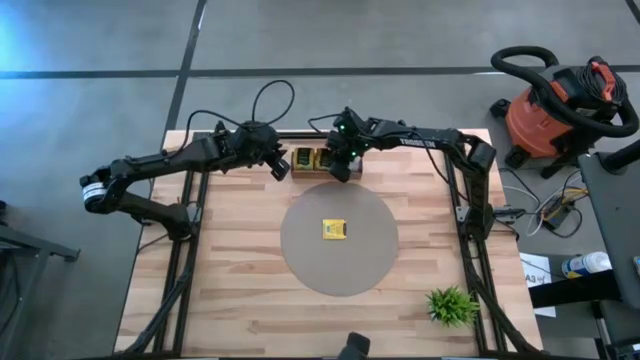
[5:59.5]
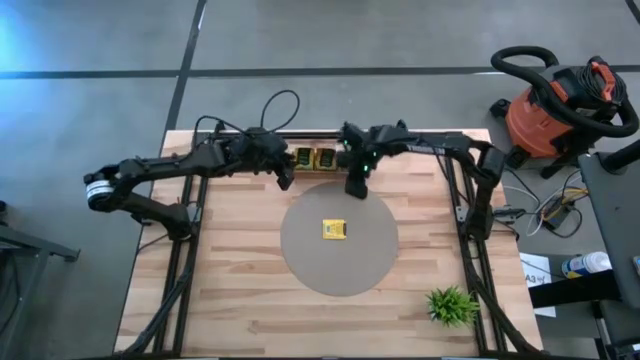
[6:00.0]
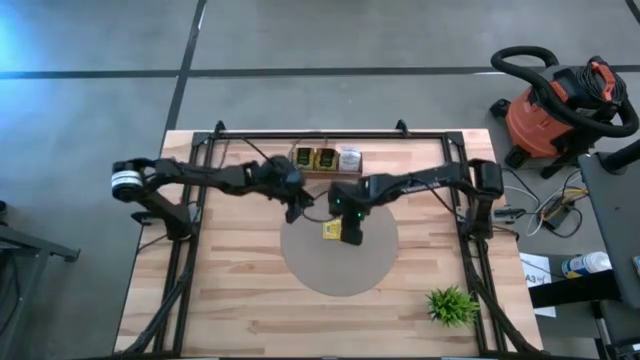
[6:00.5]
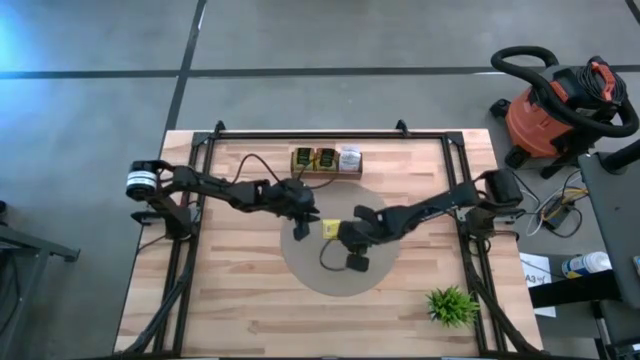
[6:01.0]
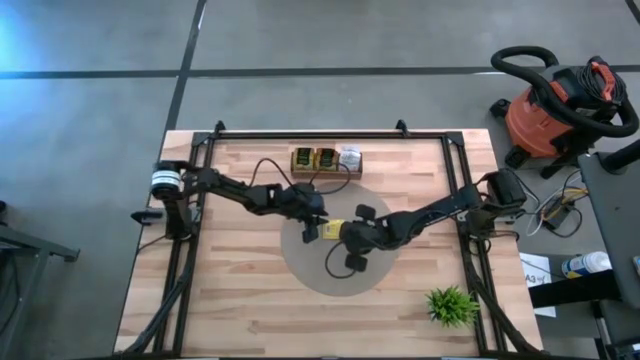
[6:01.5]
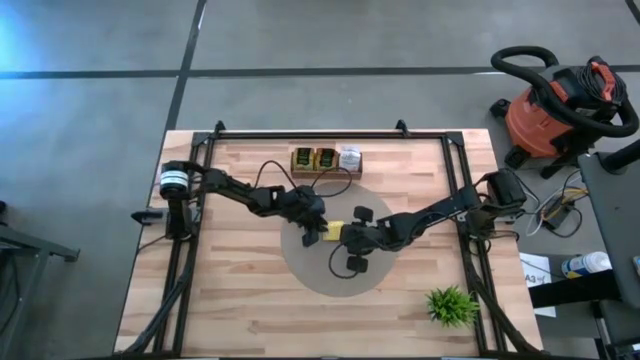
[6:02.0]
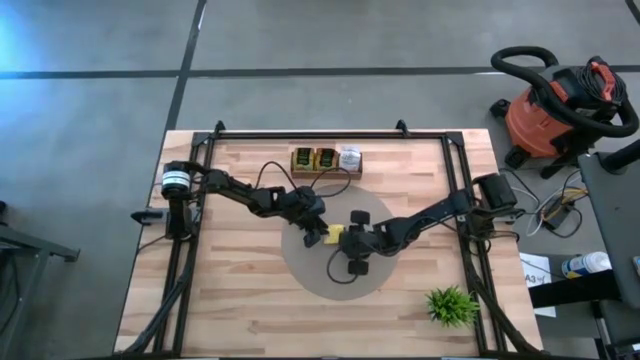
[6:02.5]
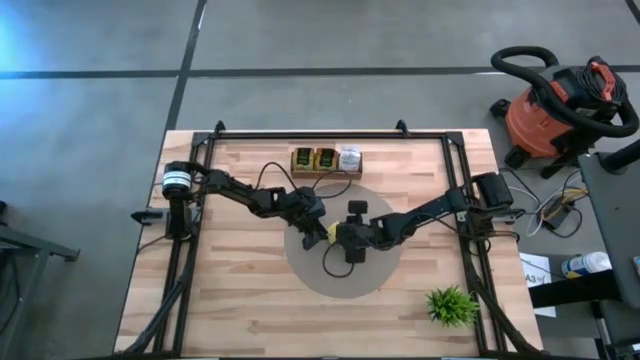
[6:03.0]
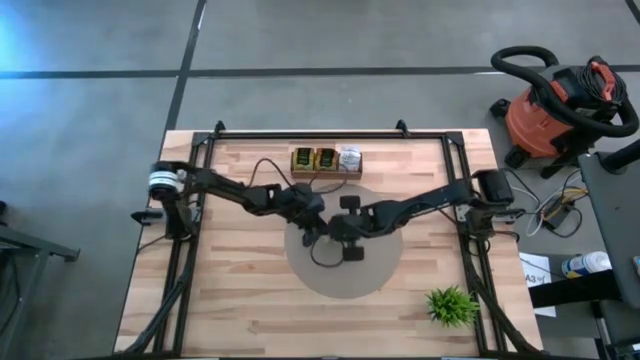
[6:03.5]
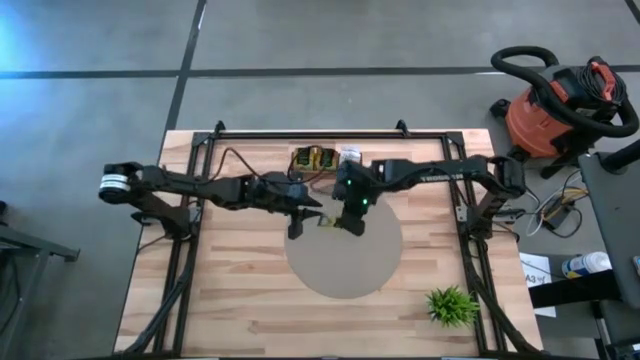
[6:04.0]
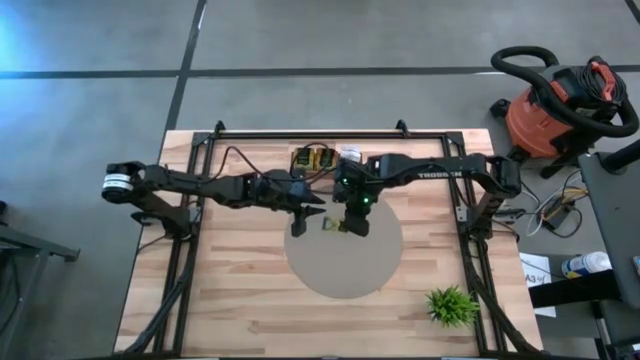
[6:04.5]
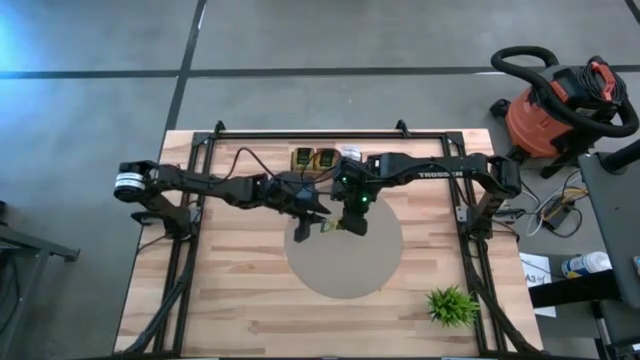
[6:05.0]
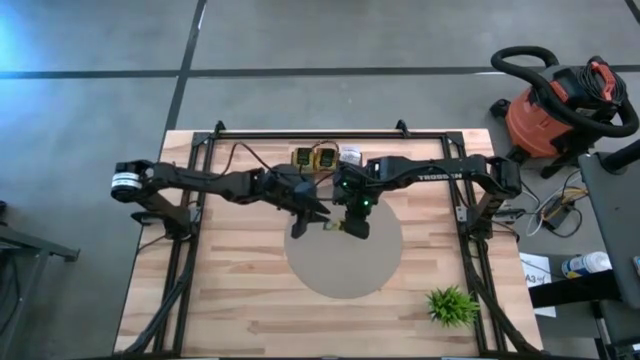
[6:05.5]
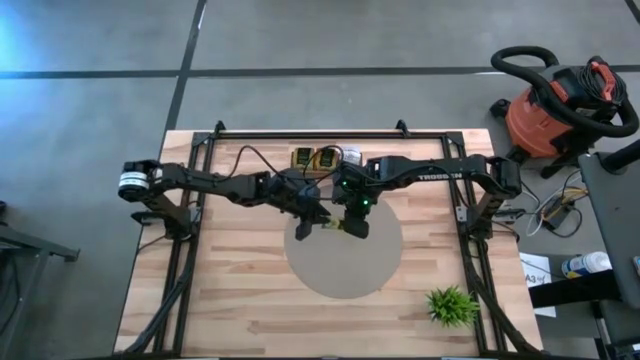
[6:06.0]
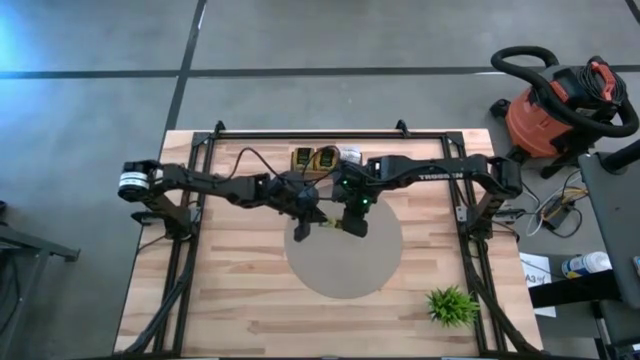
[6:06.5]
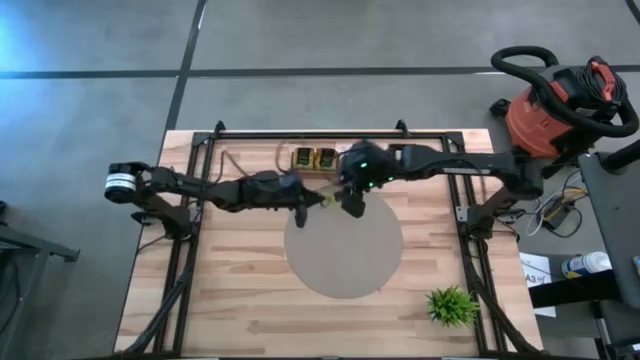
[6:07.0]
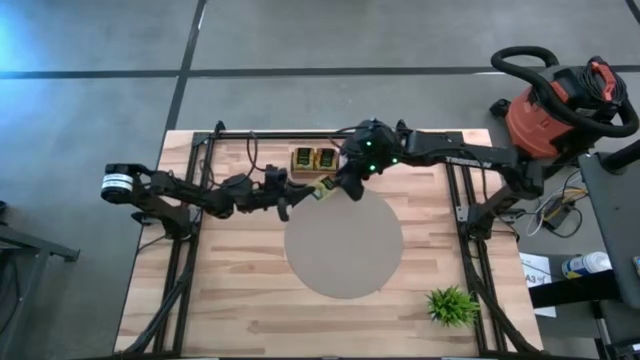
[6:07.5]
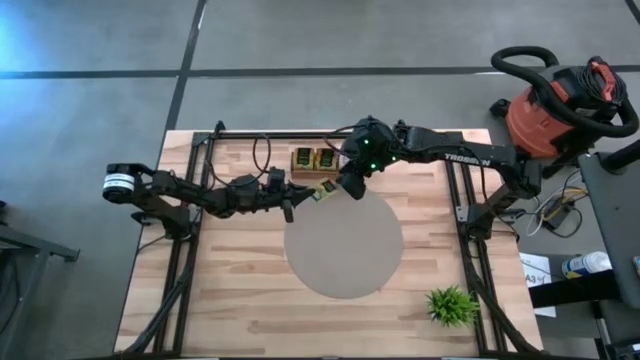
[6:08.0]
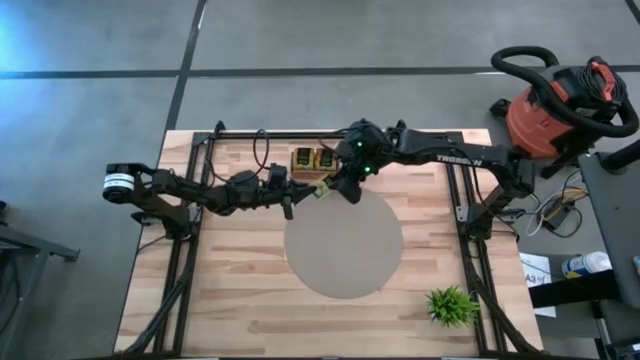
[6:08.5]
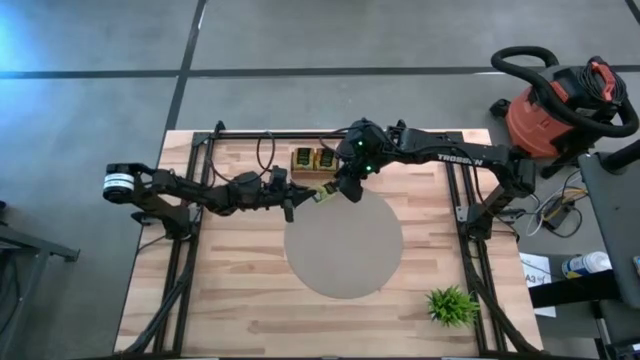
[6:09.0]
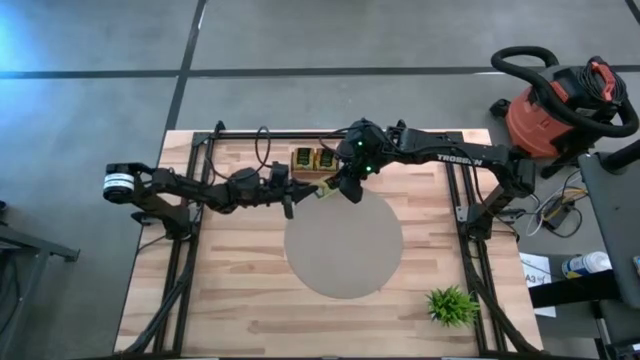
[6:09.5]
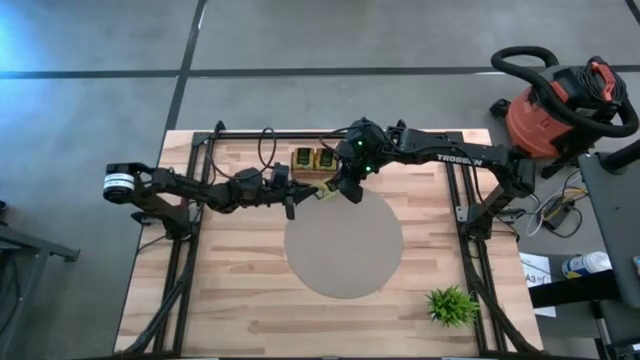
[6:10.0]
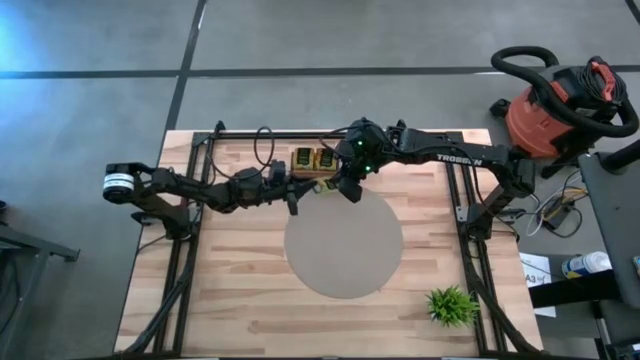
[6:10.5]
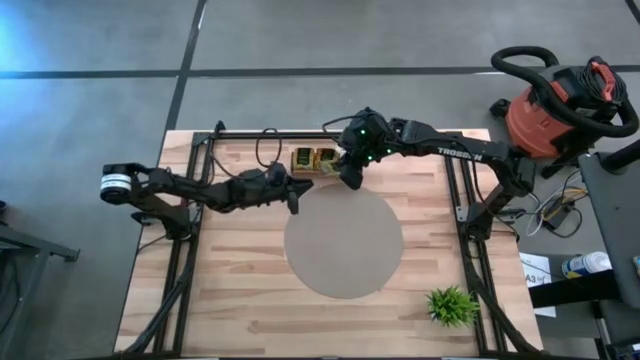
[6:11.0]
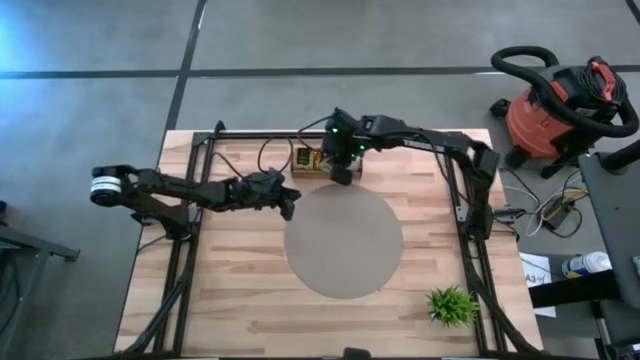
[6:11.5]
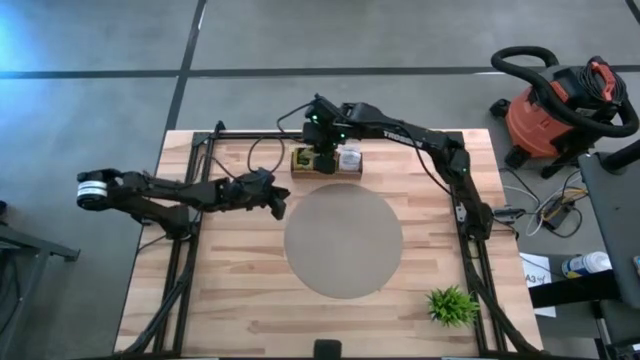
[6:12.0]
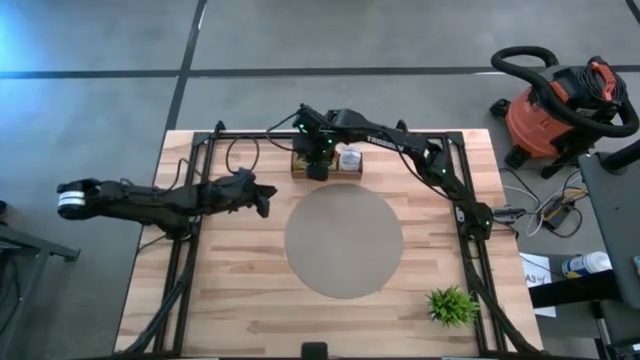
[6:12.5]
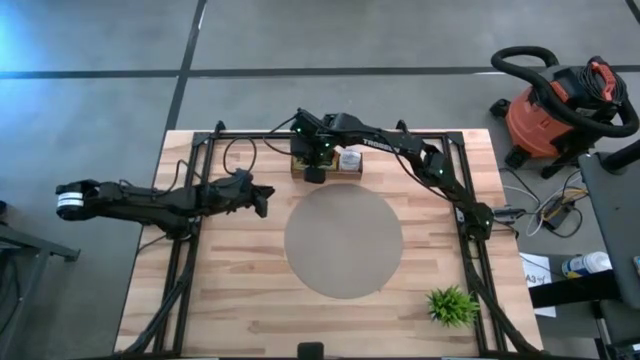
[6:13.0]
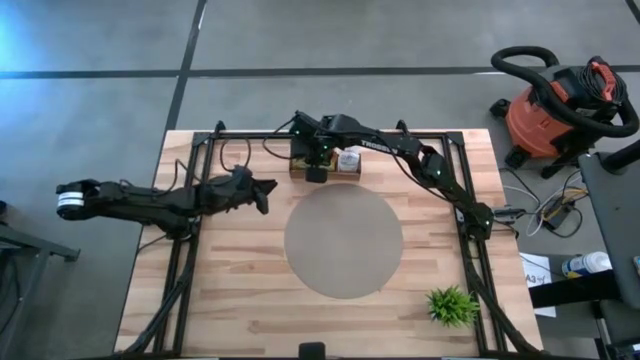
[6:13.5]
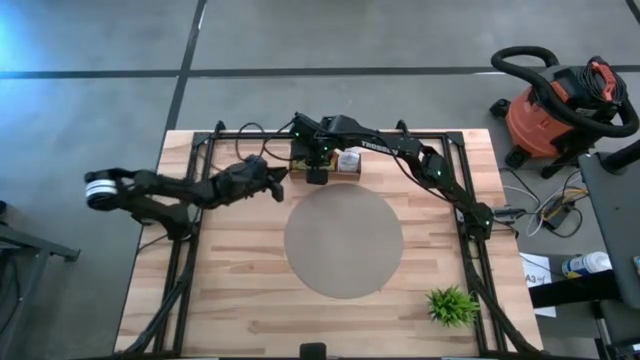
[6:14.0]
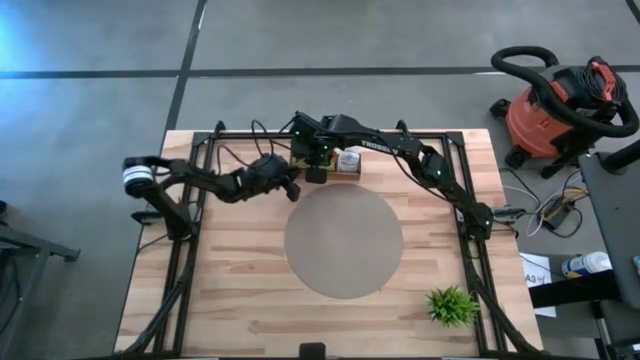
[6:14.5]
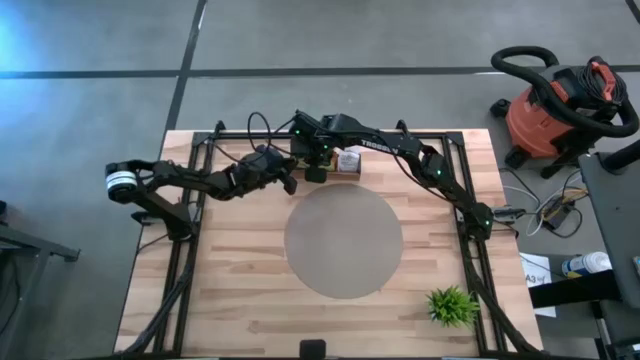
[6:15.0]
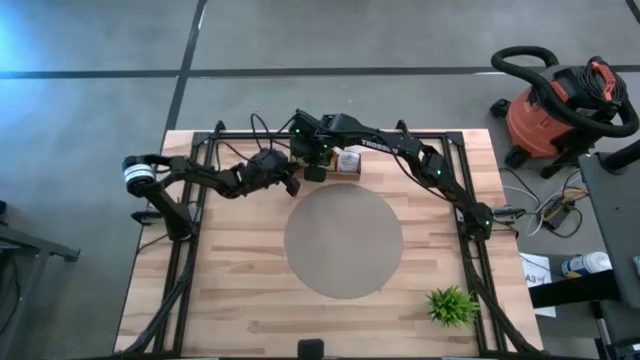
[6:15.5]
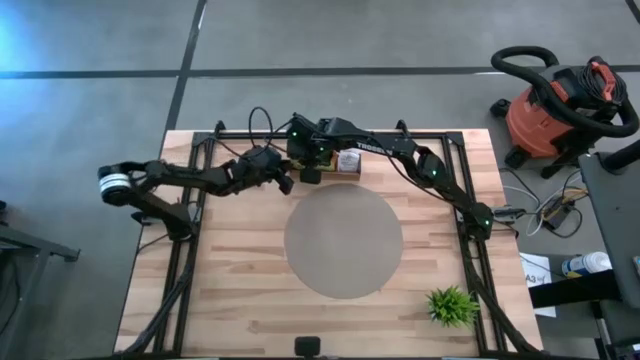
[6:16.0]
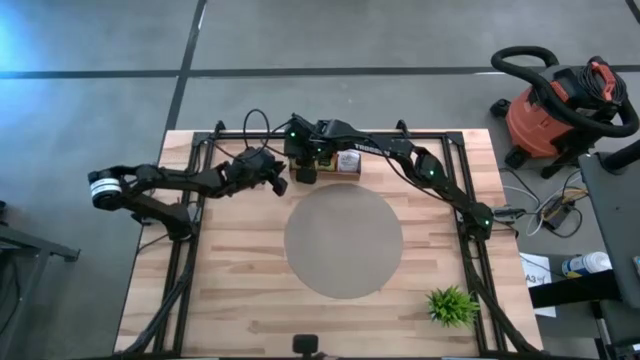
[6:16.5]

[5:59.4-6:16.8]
Task: Pick & Place Tea
Put the yellow tea bag into the left compartment of the wooden organizer

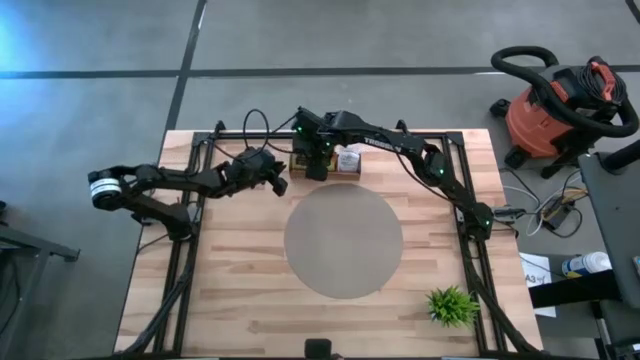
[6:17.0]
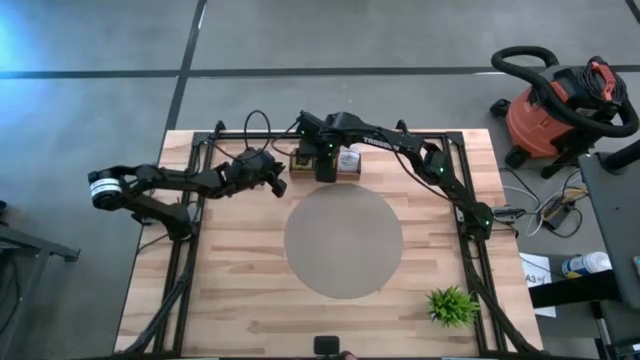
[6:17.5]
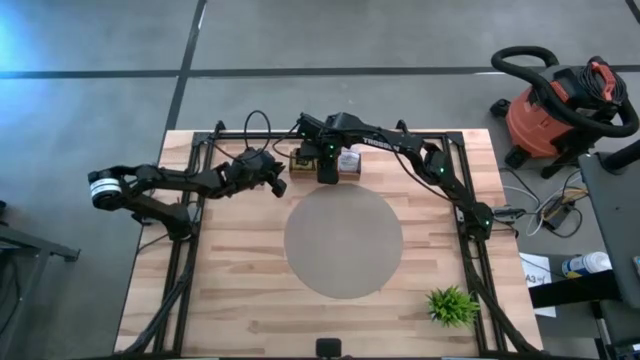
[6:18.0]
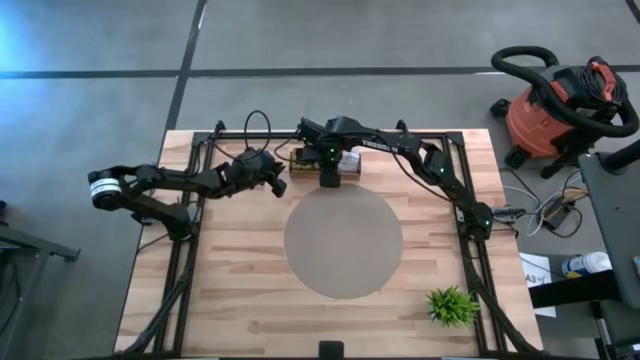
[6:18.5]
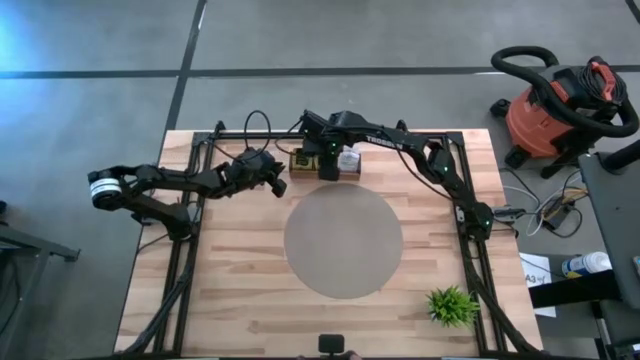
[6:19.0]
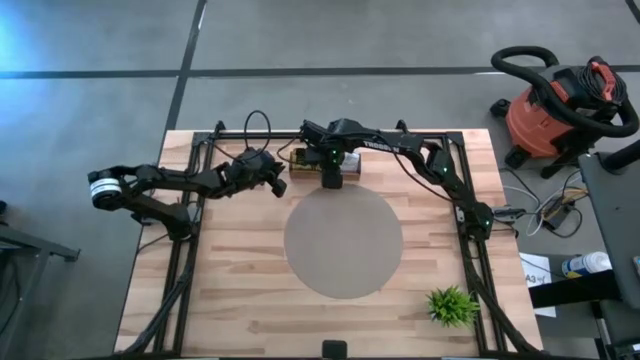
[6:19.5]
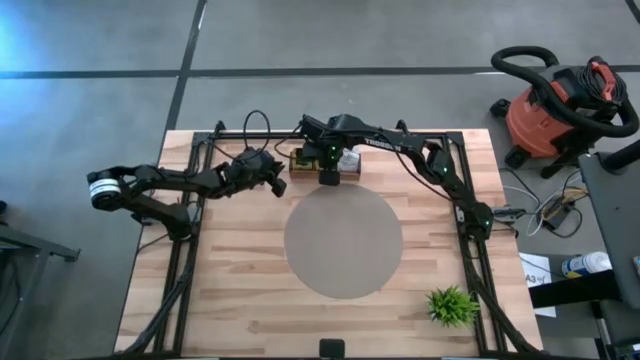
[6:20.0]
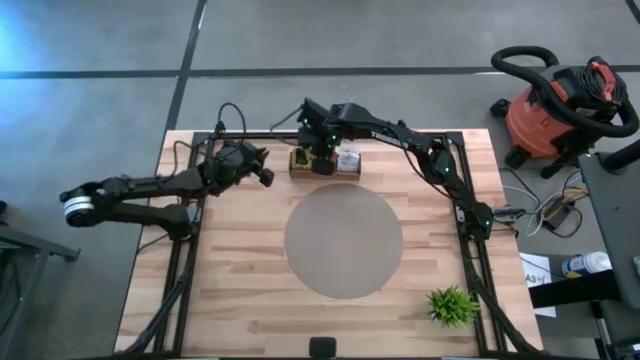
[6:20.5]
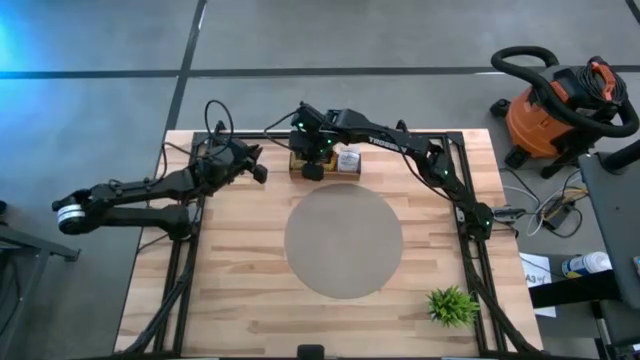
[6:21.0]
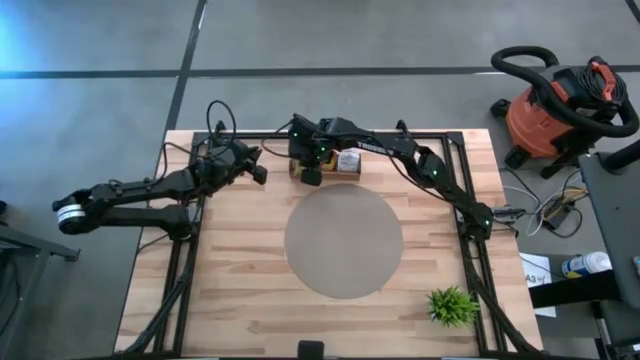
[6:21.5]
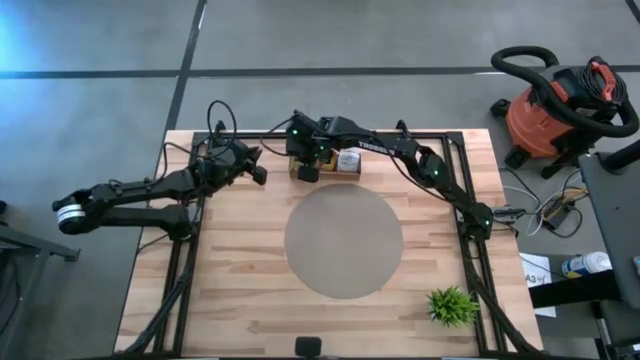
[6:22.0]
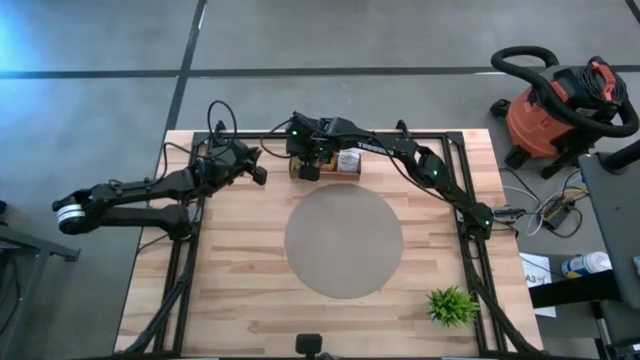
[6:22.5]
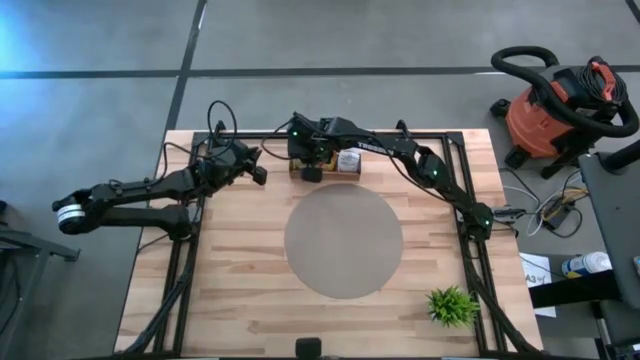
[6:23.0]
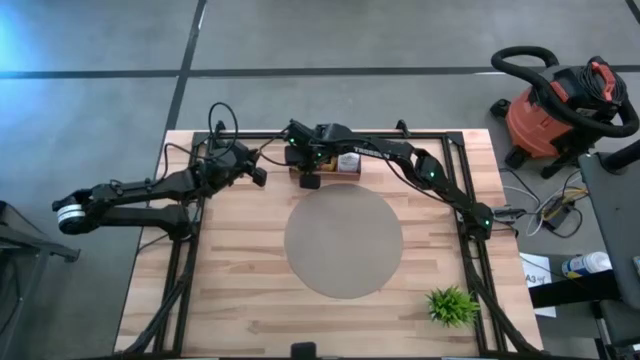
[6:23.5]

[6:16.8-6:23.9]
Put the yellow tea bag into the left compartment of the wooden organizer
